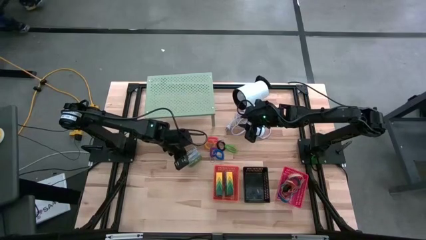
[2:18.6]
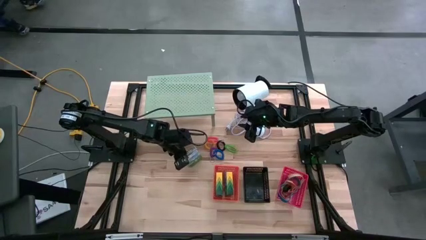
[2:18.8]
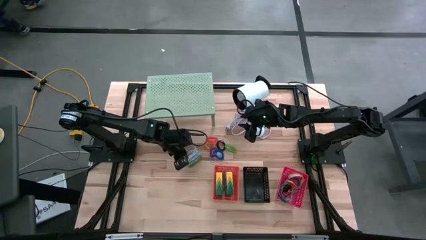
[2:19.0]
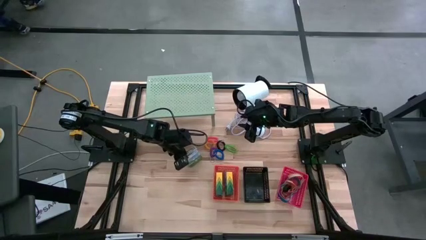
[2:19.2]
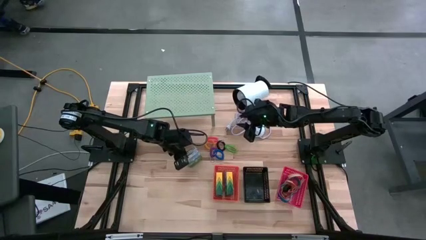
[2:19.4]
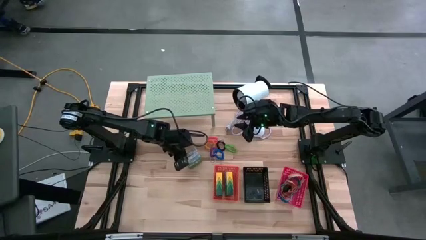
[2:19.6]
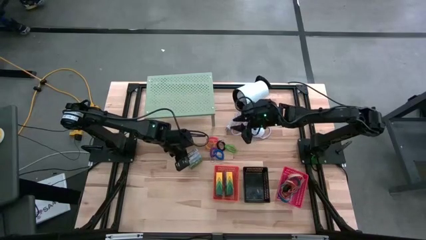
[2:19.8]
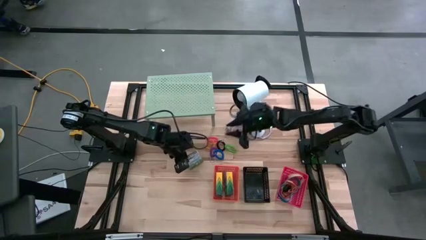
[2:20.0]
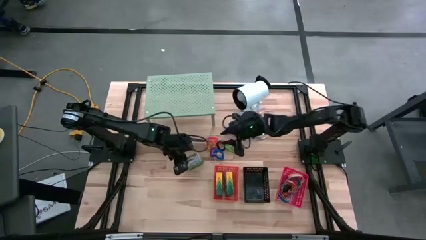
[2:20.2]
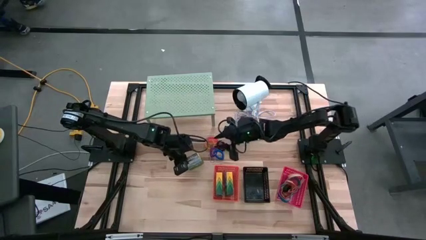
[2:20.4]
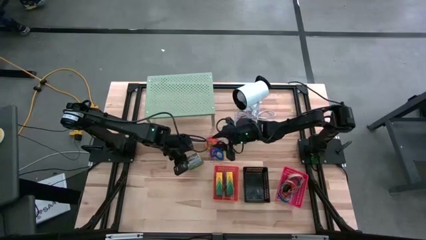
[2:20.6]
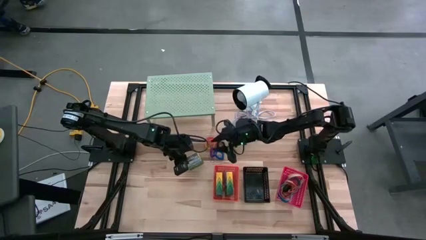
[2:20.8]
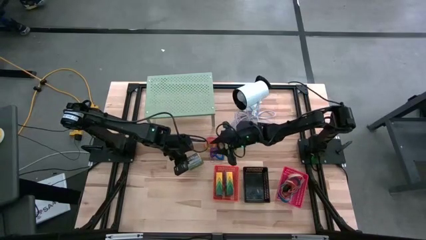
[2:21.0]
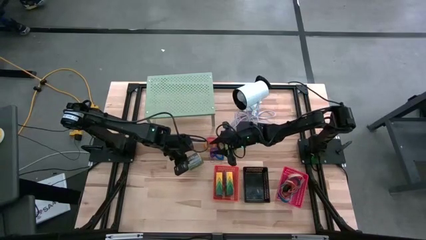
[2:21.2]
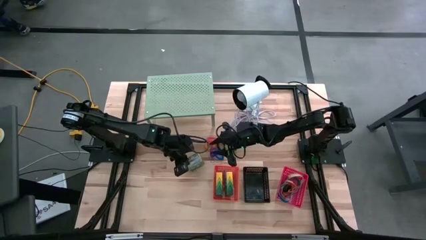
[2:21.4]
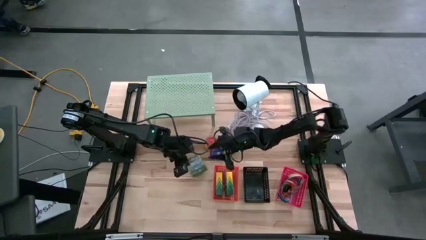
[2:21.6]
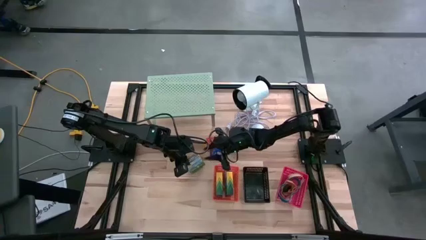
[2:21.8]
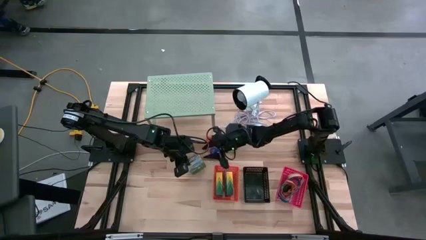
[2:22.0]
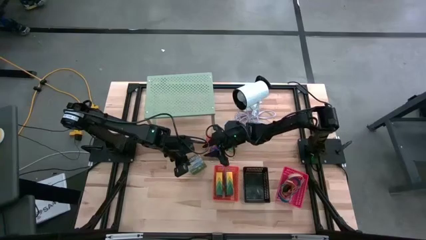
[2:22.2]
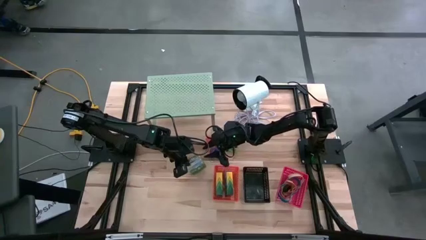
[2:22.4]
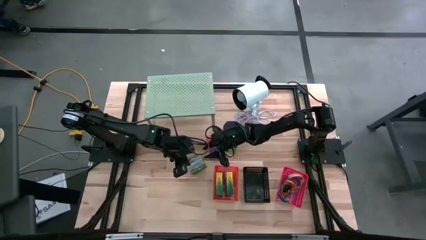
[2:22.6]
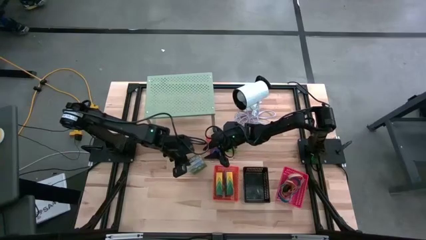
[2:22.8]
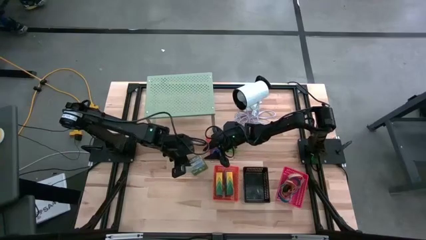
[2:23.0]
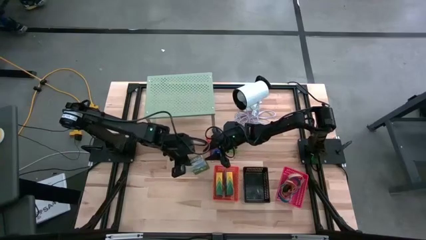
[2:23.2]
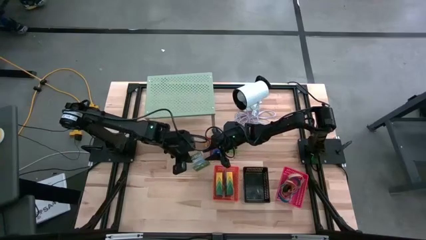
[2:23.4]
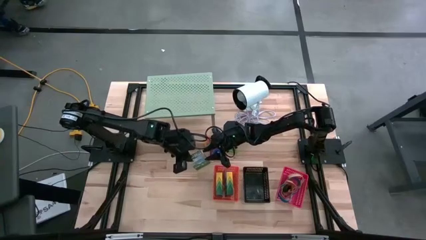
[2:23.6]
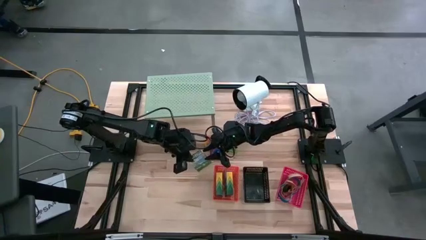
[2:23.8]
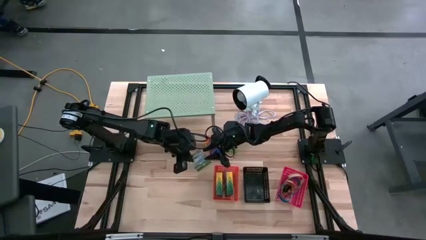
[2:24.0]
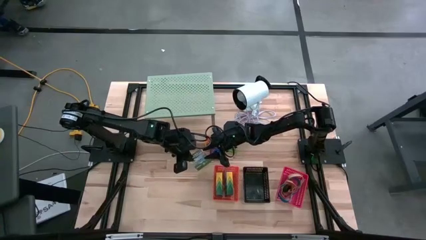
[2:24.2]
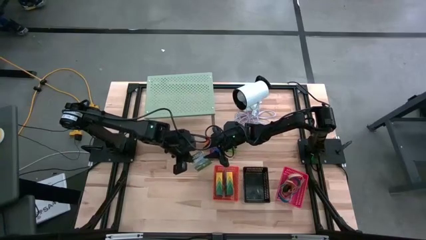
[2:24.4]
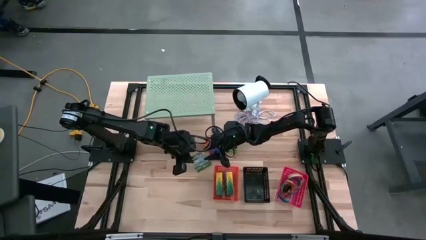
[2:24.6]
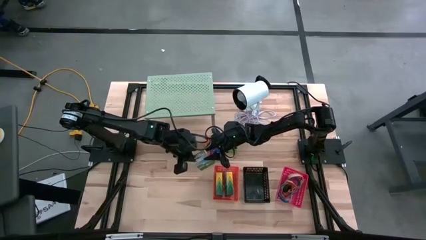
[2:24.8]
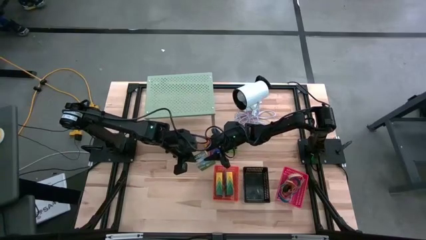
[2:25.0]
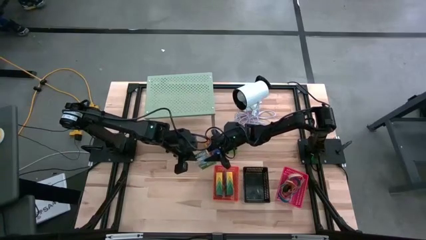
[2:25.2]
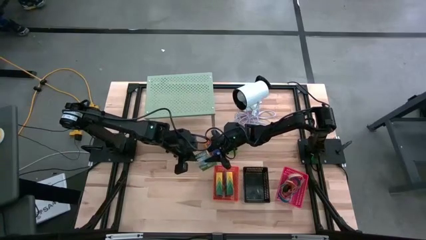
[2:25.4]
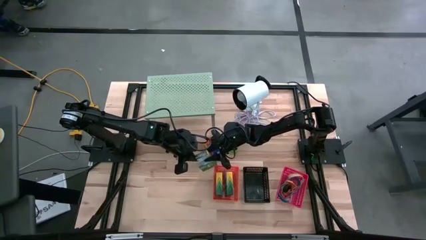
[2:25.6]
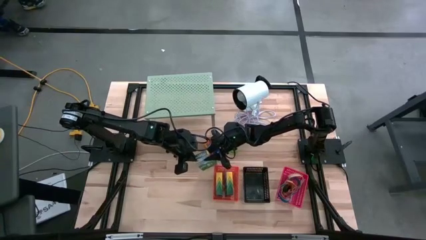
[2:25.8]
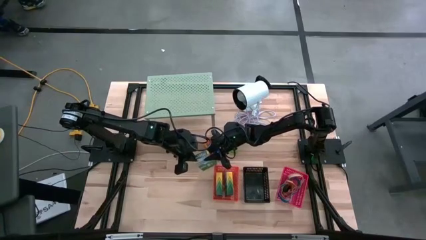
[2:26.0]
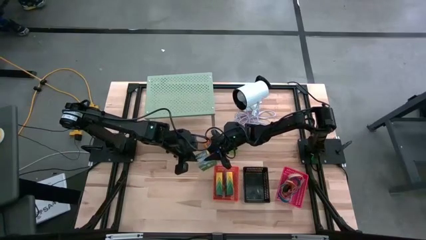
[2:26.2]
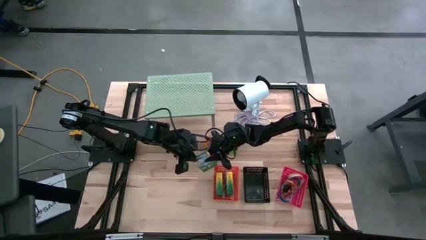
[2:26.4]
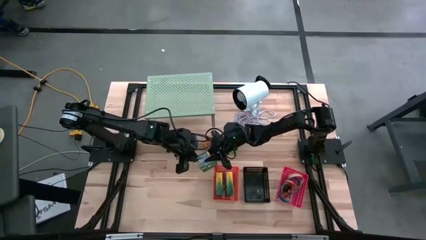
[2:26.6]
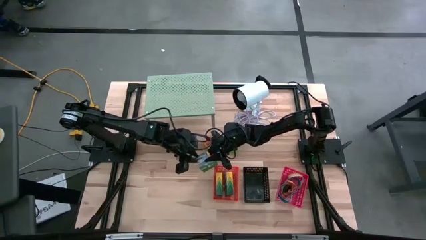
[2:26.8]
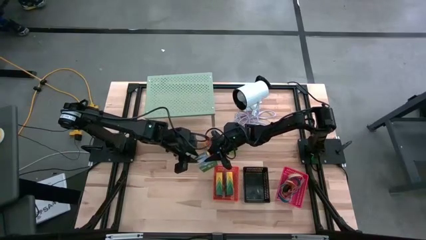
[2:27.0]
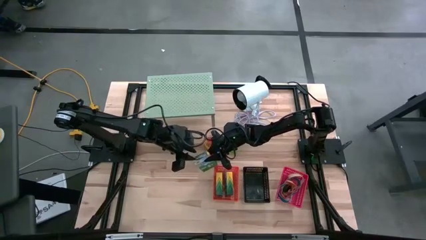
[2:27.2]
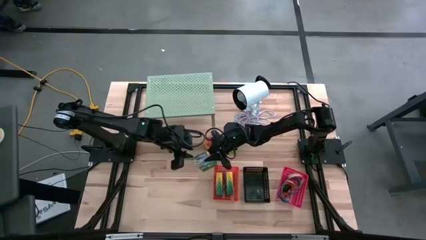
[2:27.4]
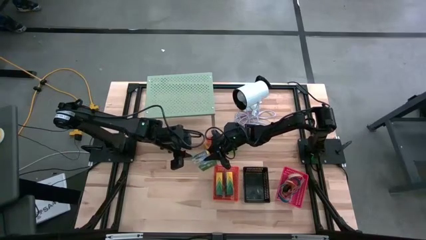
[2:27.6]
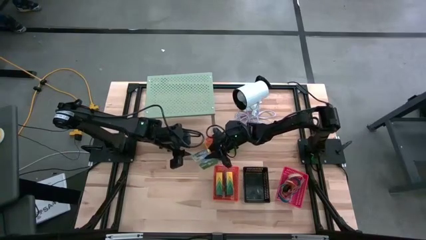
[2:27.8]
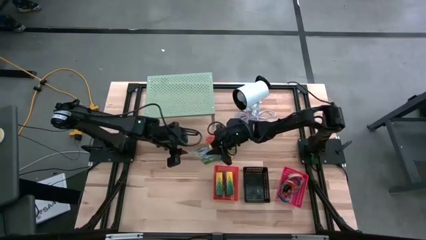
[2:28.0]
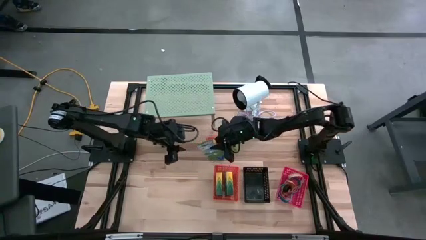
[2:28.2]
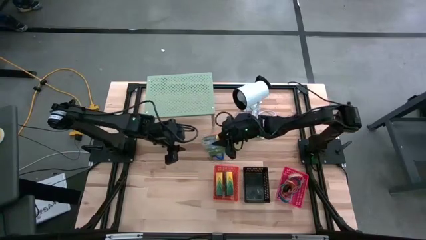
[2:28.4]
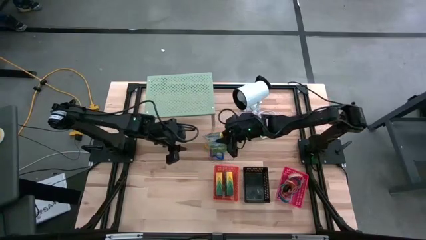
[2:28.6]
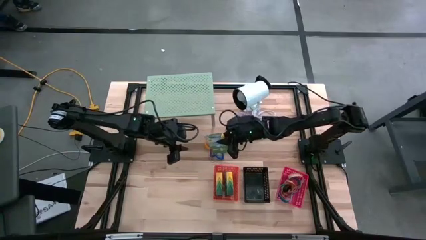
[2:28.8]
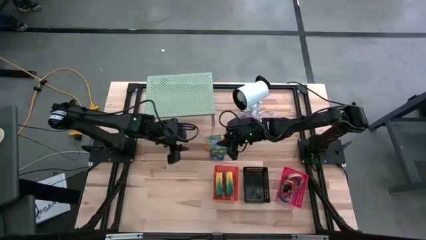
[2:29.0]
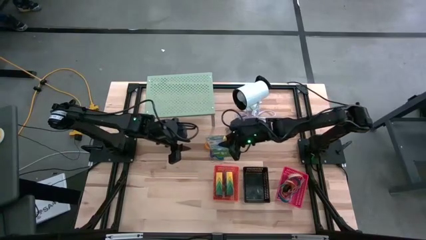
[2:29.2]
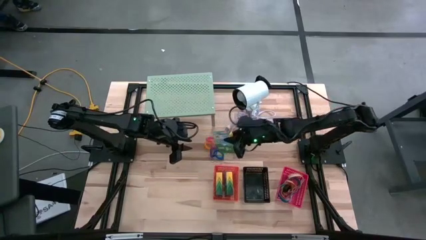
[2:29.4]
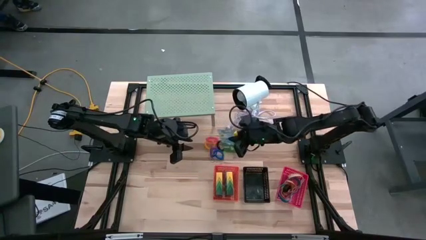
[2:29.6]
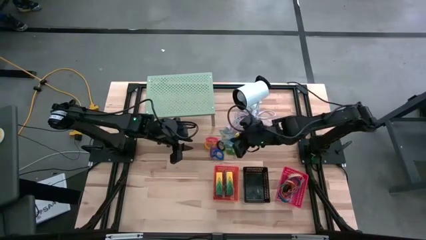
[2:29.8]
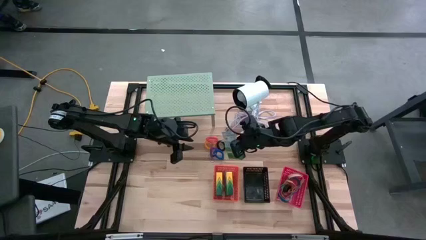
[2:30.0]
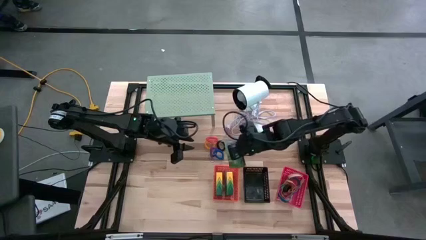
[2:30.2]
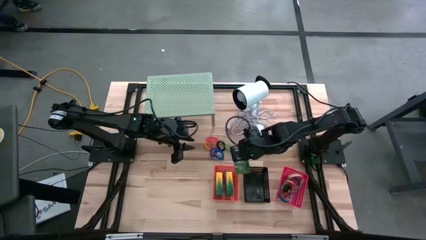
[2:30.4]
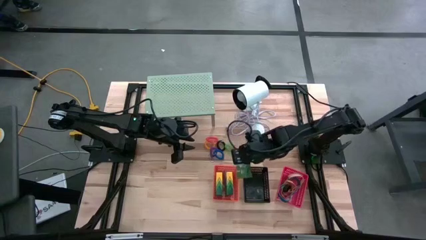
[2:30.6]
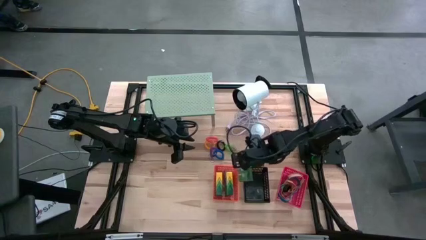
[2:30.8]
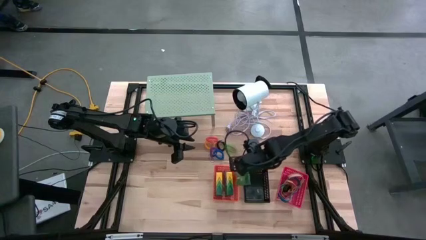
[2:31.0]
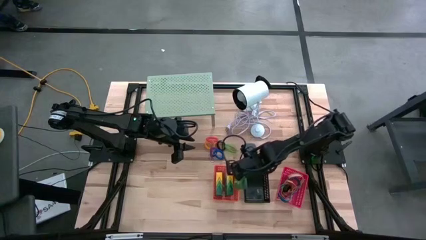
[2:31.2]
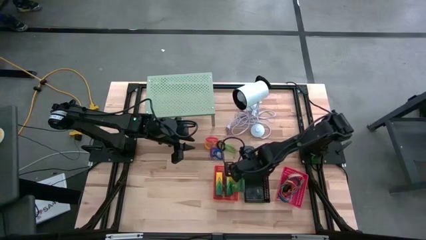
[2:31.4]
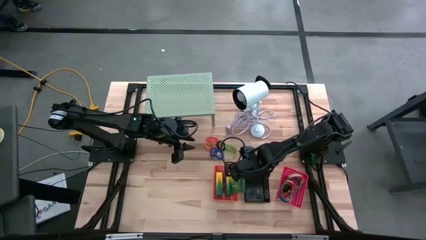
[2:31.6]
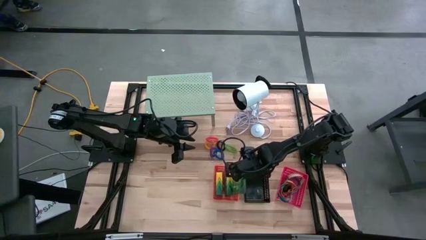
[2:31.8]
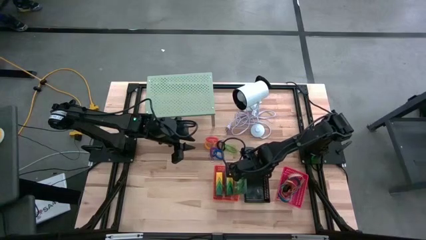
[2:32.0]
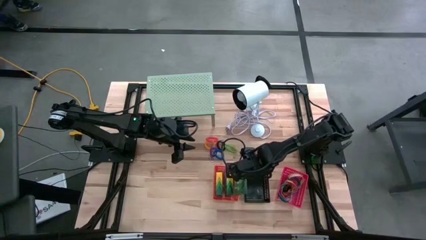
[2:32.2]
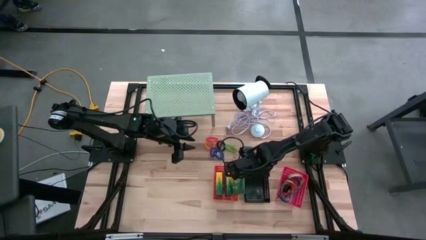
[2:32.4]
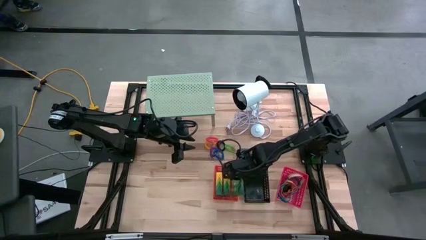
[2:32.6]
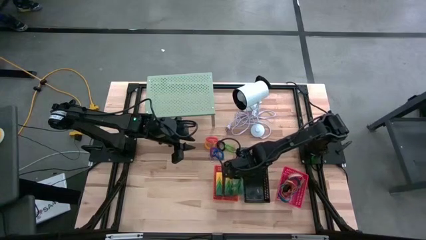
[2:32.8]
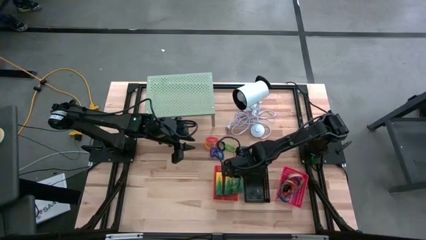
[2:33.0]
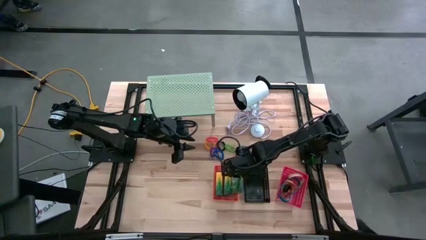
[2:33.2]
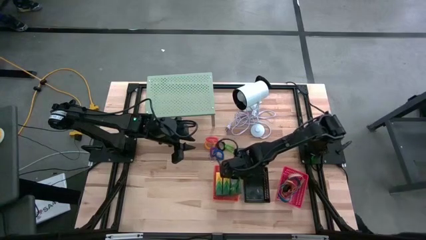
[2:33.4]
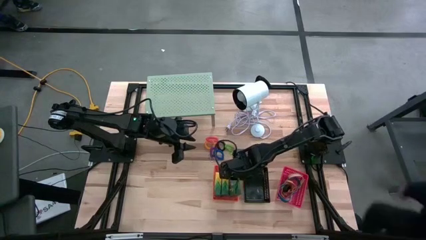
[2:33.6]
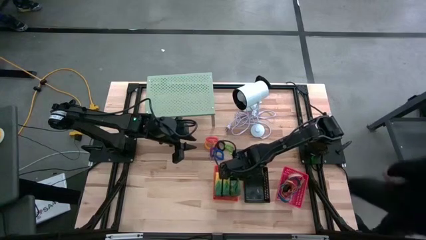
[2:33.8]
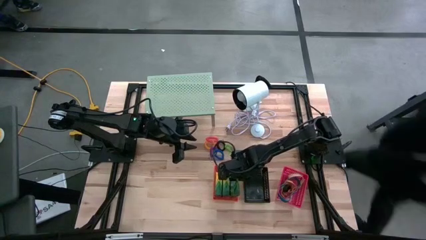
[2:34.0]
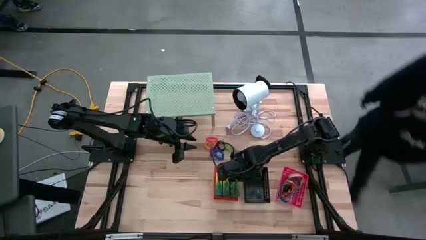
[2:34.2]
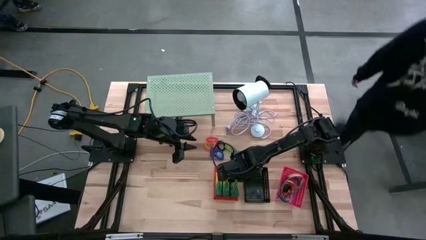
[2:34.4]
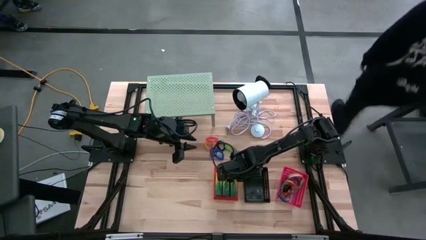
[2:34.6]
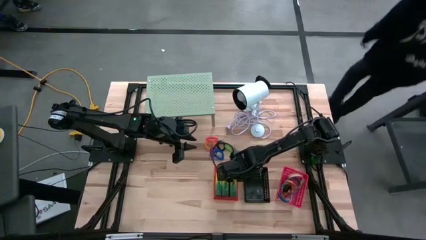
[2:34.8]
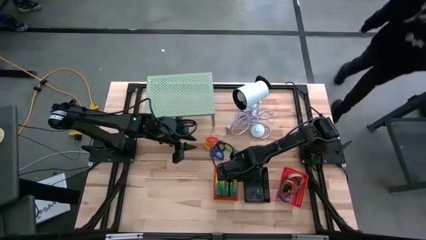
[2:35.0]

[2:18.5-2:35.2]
Task: Pick & Place Office Desk Supplies
Put the crayon box into the orange basket
